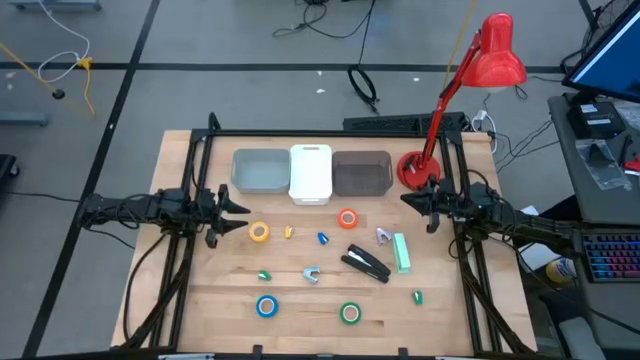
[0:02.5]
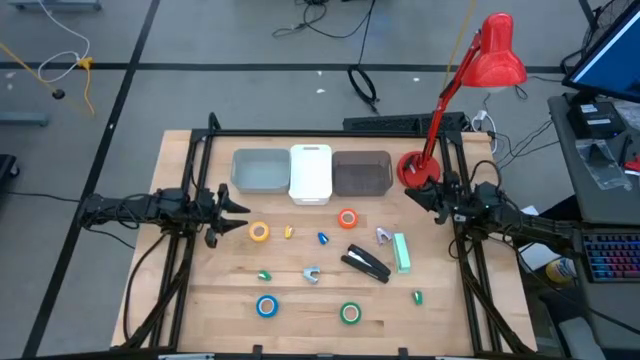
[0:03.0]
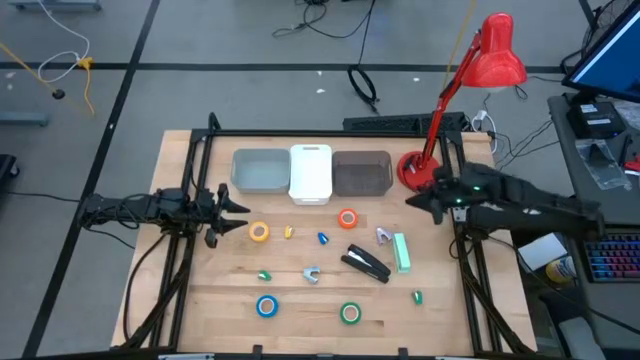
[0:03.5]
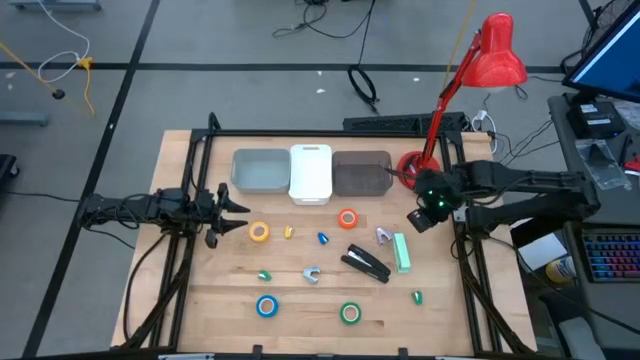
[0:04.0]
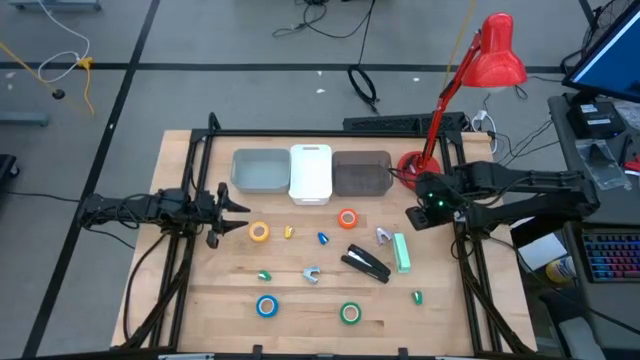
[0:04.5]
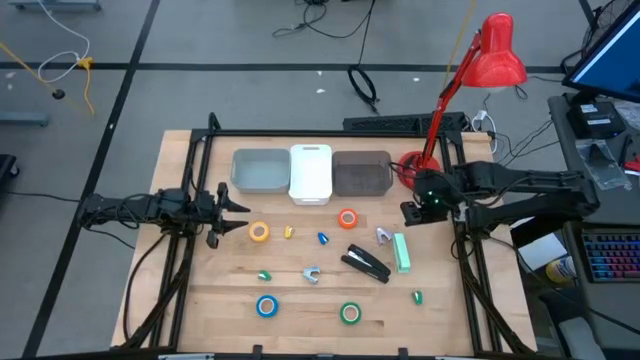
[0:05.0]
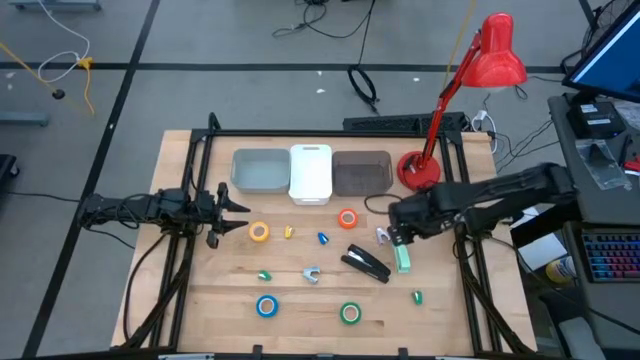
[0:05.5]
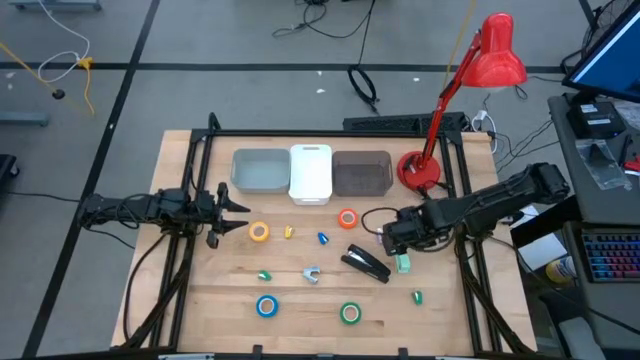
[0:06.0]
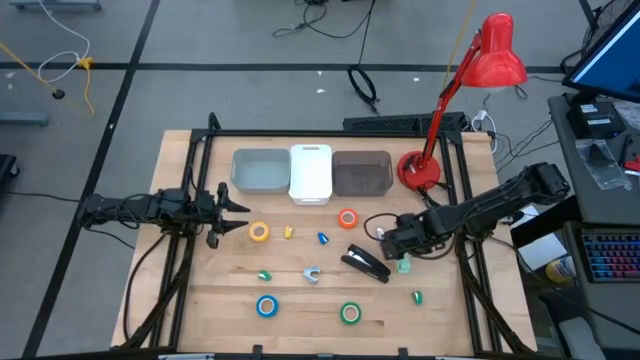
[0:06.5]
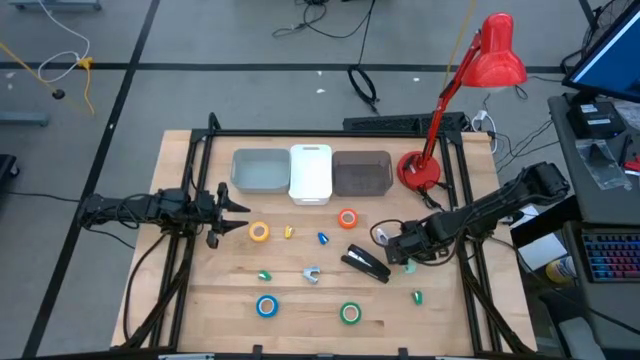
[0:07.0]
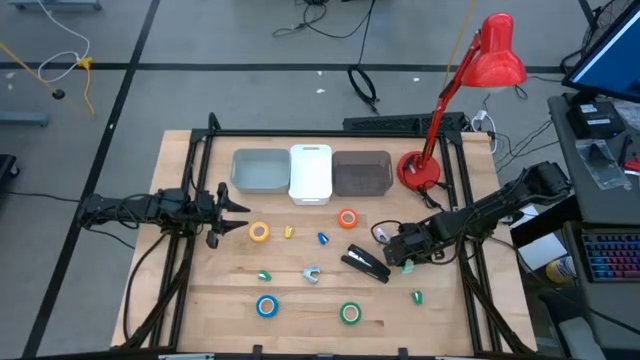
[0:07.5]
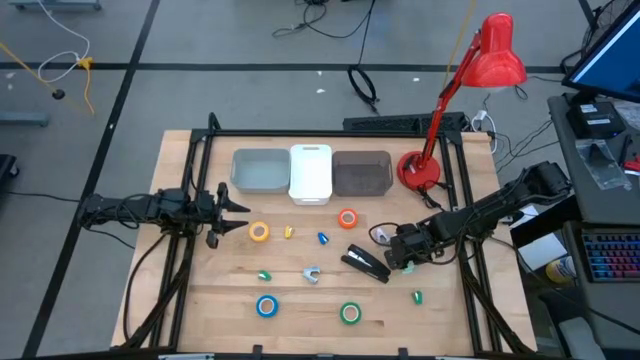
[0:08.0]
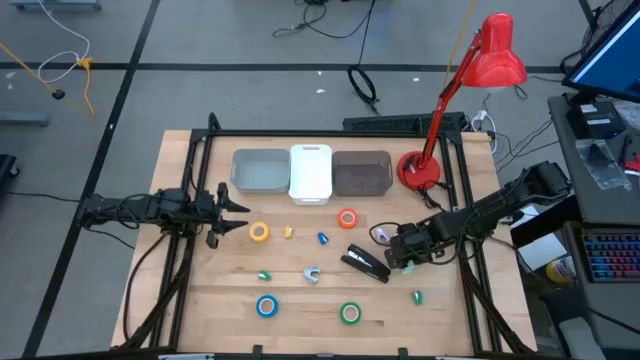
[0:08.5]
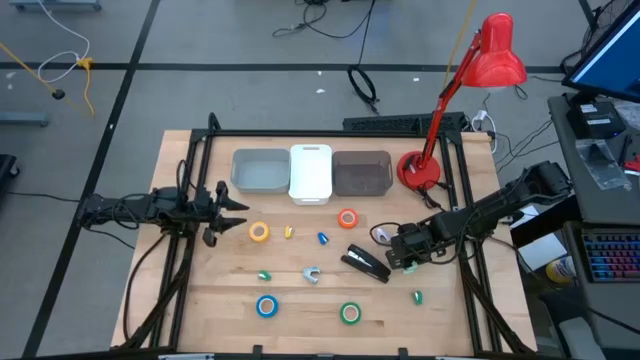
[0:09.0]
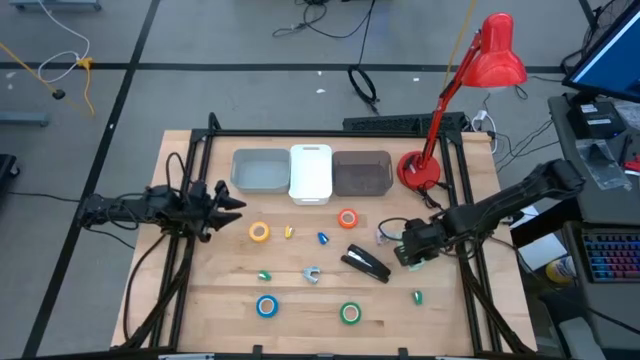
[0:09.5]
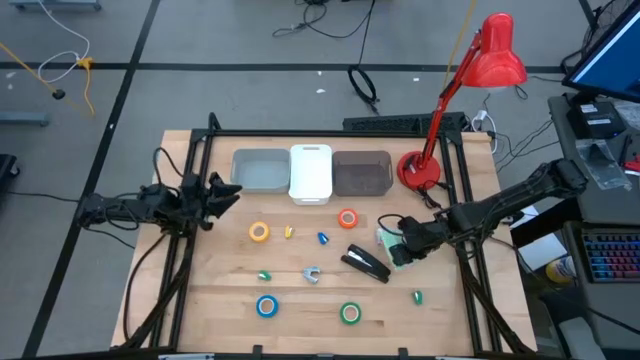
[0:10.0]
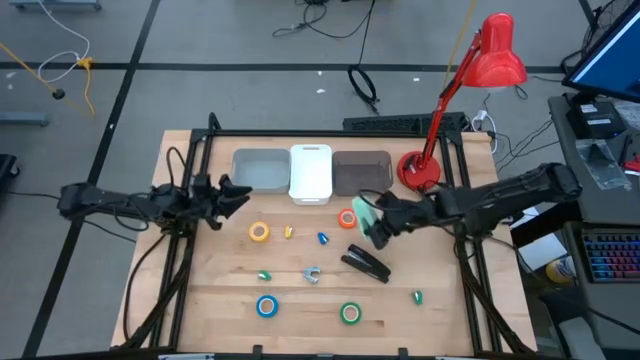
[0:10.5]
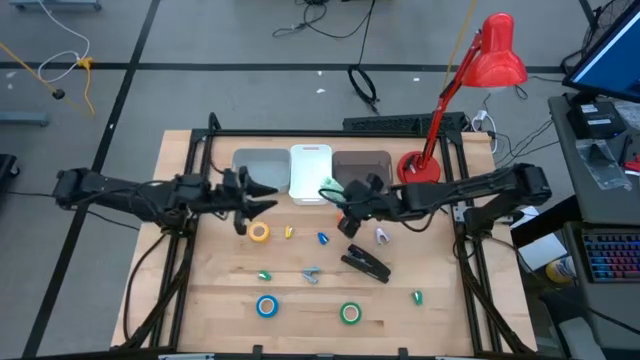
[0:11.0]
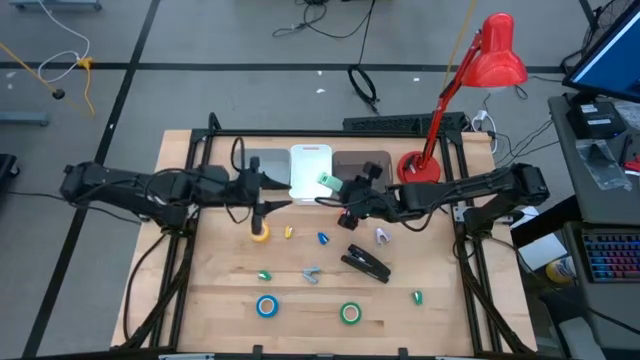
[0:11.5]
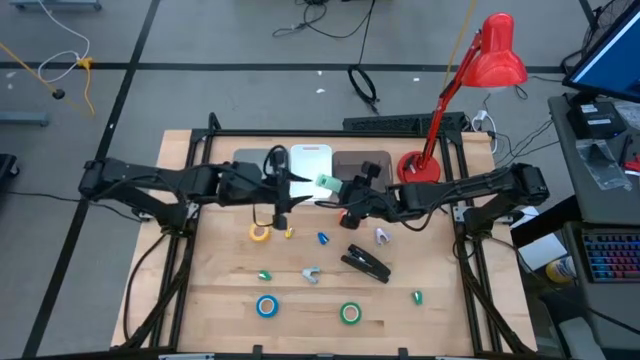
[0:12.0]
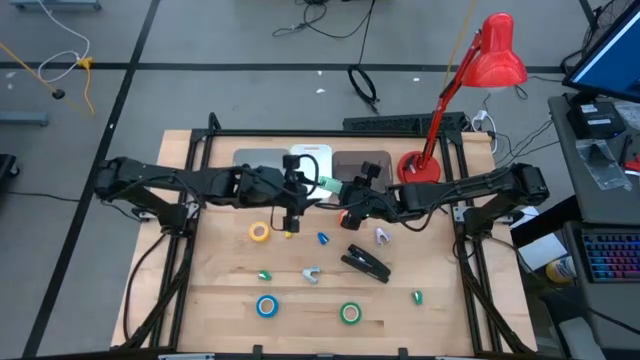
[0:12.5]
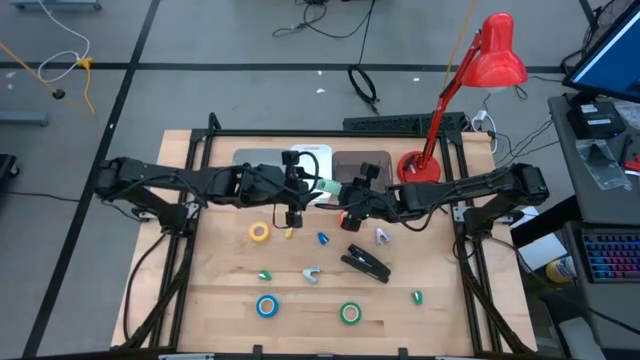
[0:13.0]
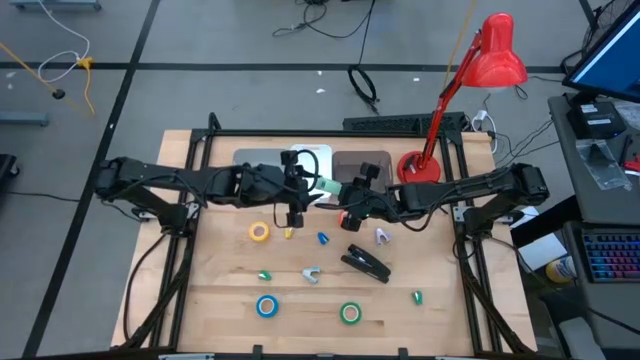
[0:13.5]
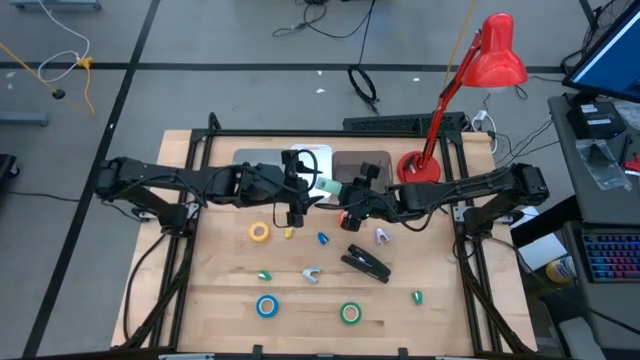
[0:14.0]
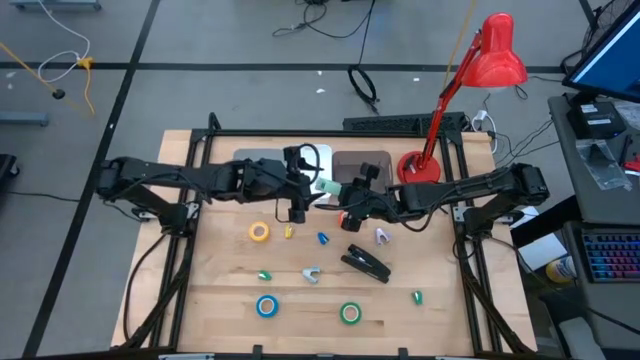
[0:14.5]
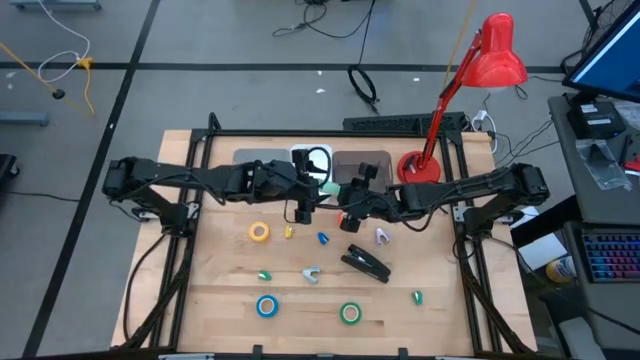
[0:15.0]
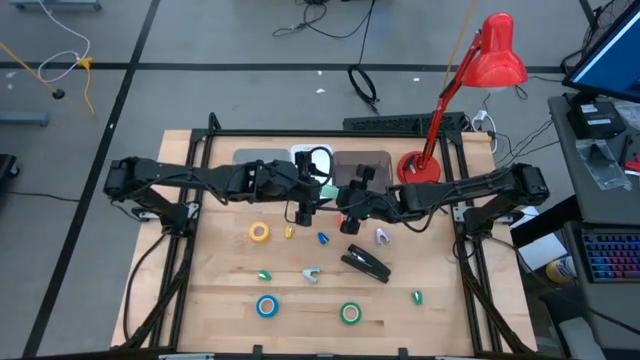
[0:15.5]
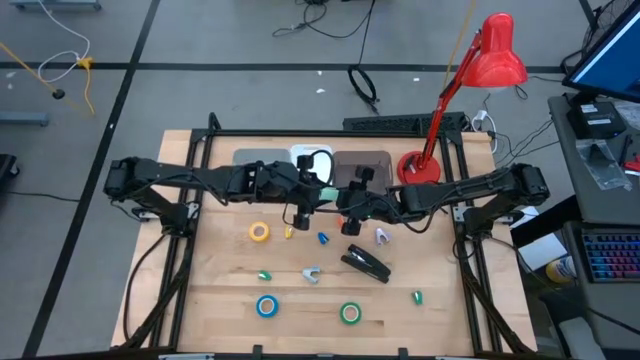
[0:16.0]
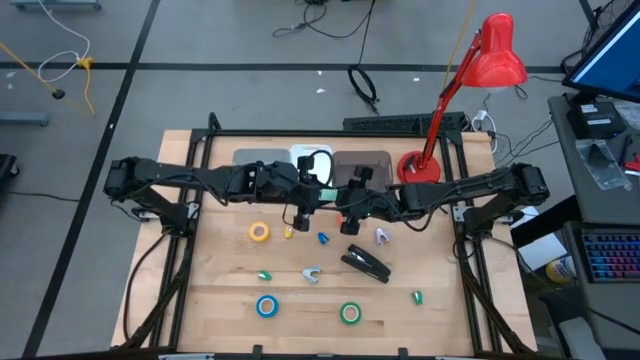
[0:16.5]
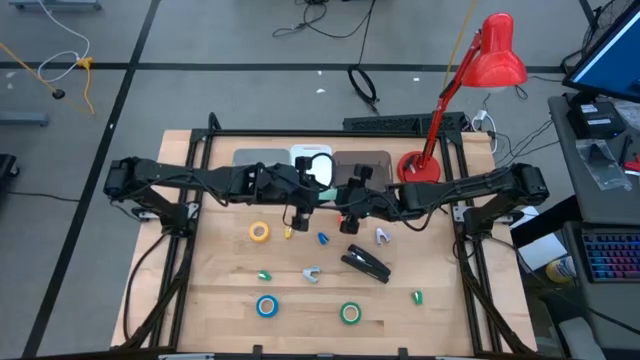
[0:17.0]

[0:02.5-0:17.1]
Task: Pick and place Stapler, Stapler remover, tape
Put the light green stapler into the gray bin

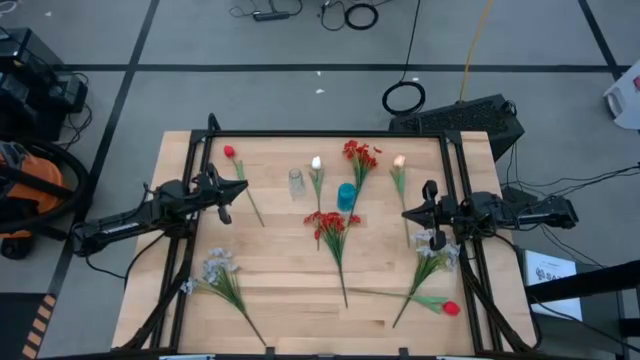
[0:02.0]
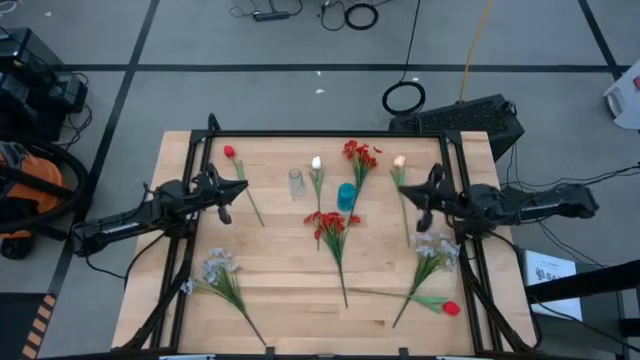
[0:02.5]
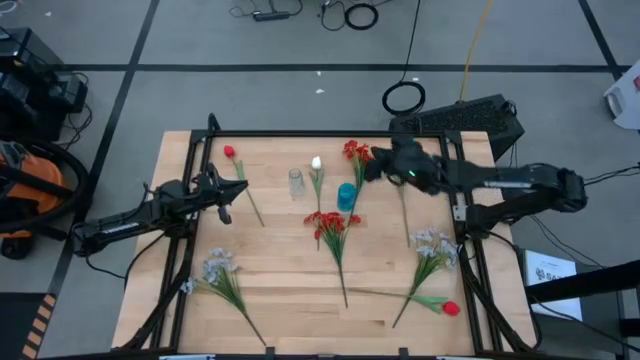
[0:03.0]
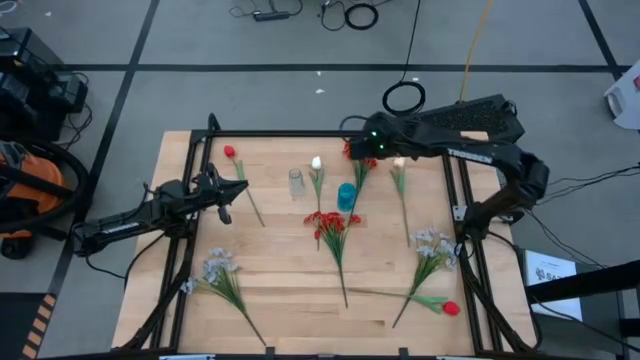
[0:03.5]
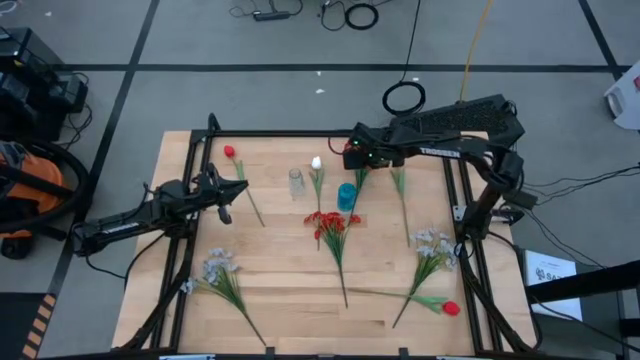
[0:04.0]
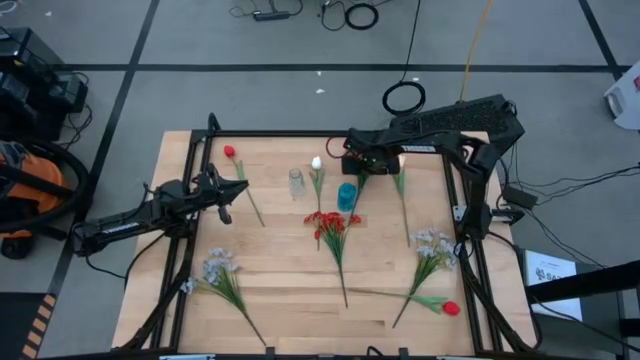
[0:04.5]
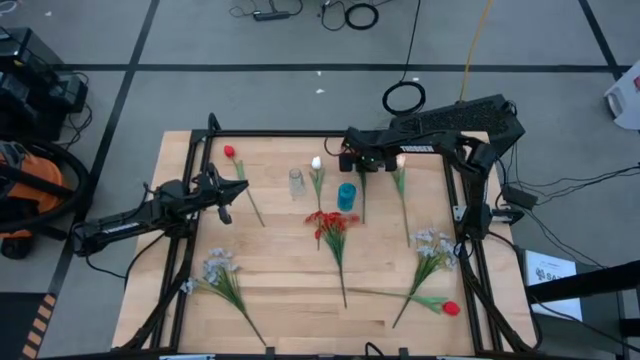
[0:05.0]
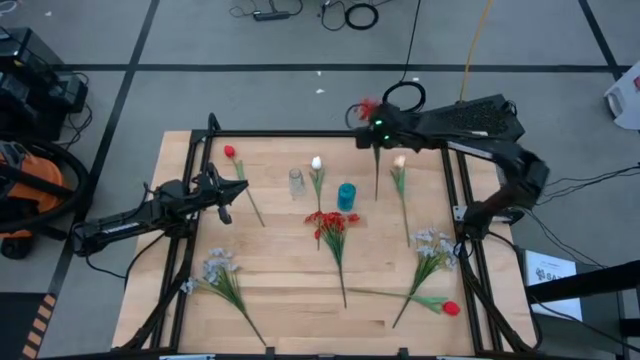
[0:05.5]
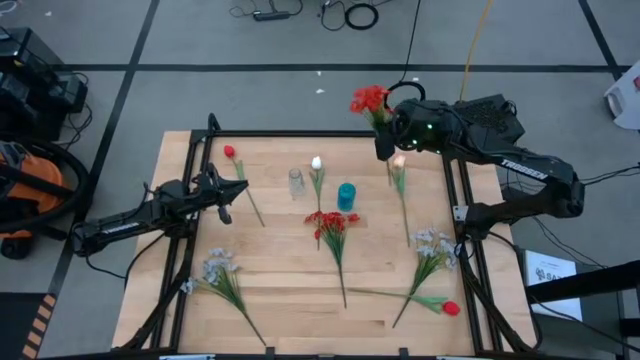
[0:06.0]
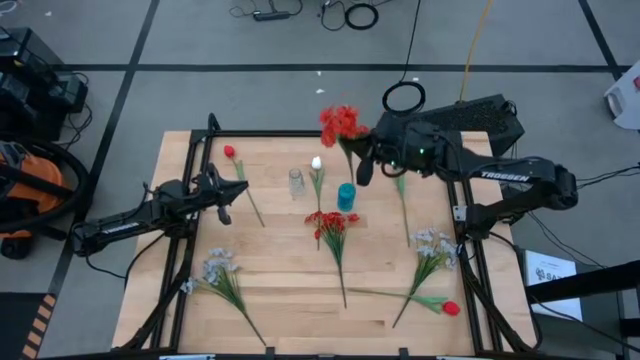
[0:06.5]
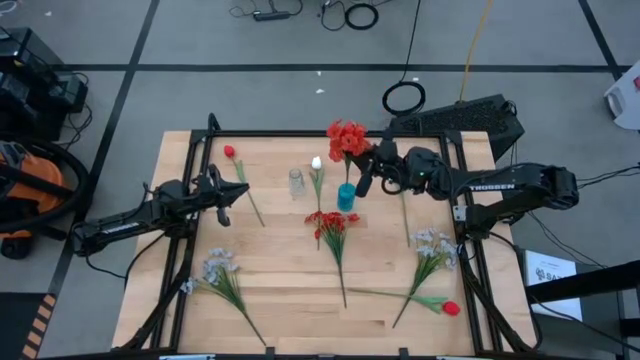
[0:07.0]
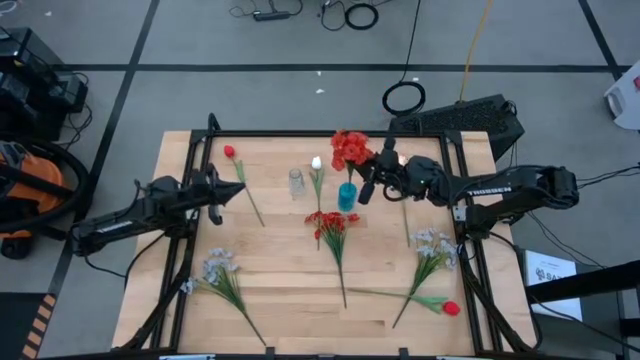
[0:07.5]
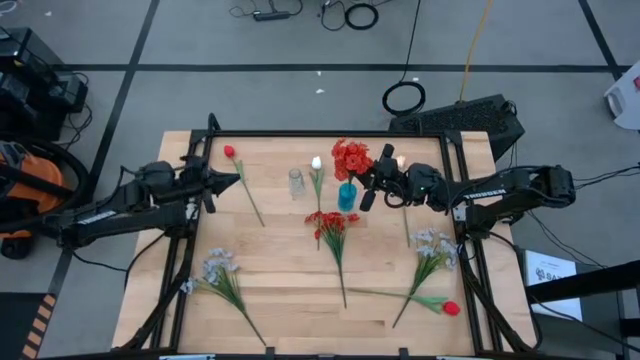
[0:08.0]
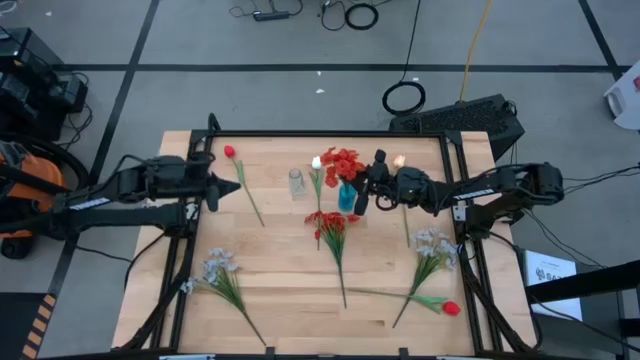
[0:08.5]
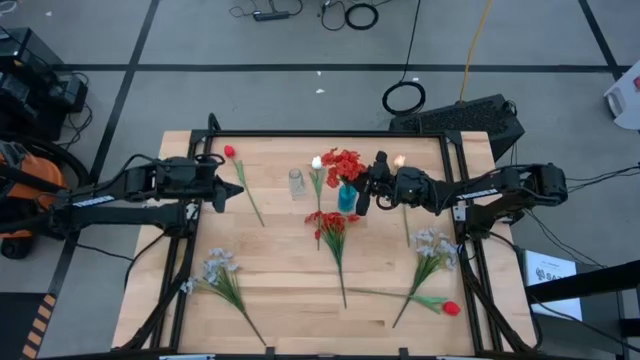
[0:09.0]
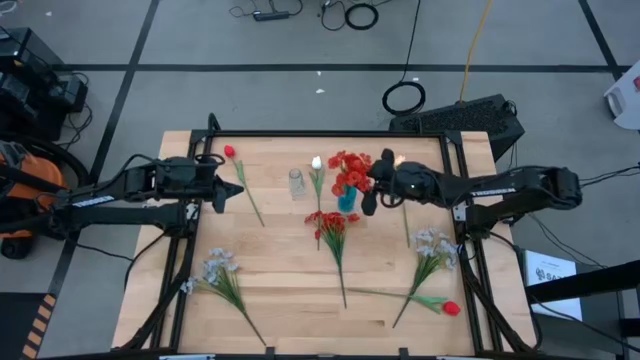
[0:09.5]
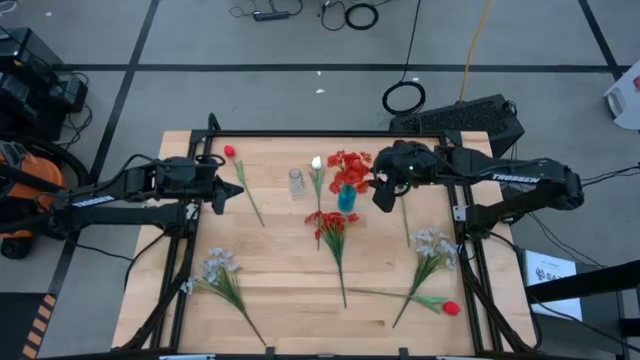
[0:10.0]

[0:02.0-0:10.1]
Task: Sort flowers into vase by color
Put the top red flowers into the blue vase
